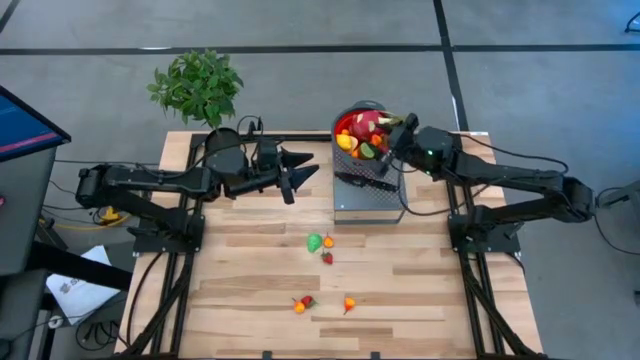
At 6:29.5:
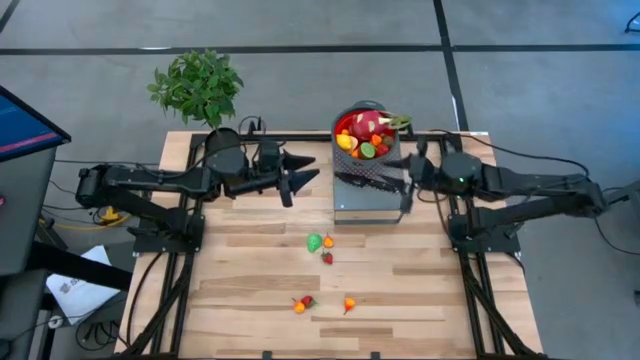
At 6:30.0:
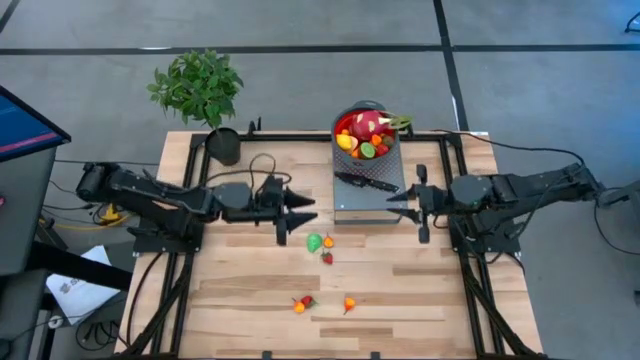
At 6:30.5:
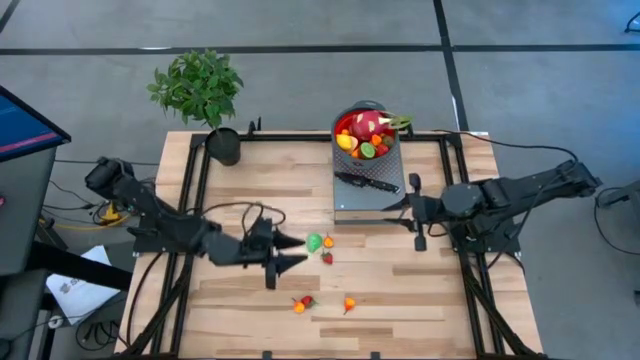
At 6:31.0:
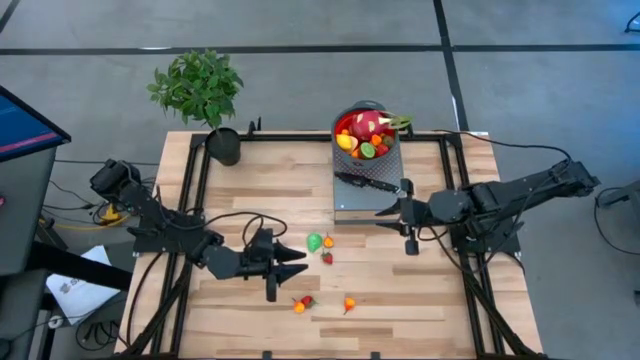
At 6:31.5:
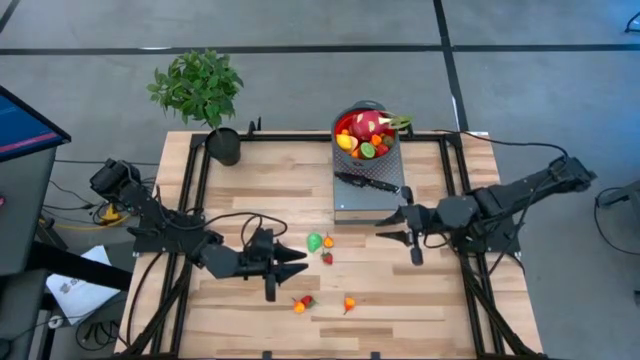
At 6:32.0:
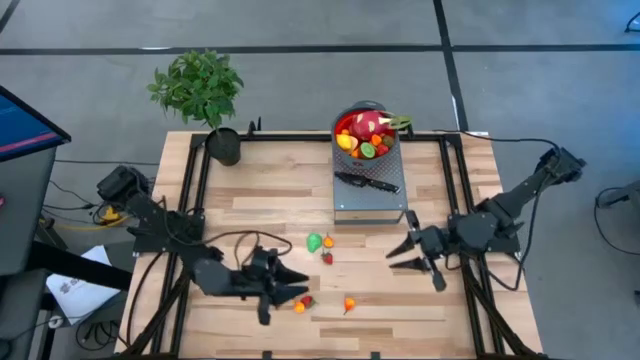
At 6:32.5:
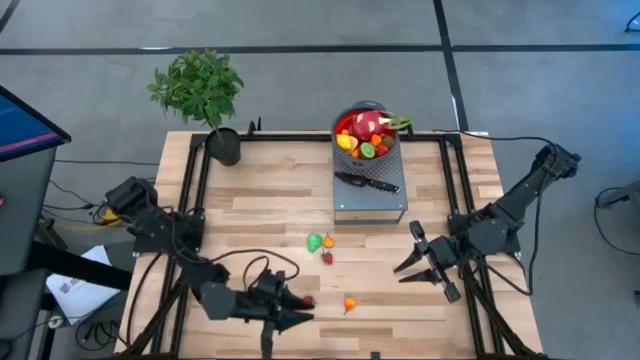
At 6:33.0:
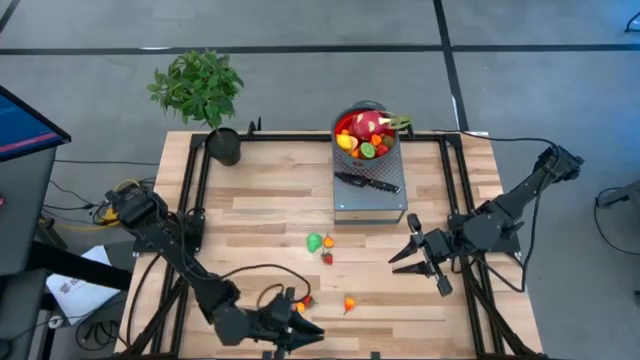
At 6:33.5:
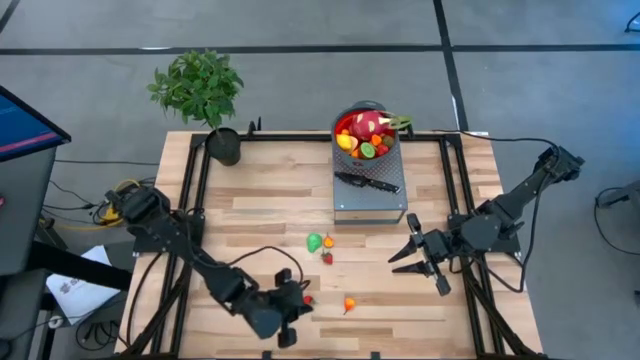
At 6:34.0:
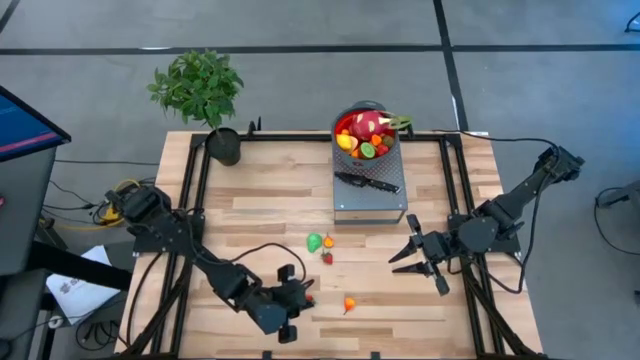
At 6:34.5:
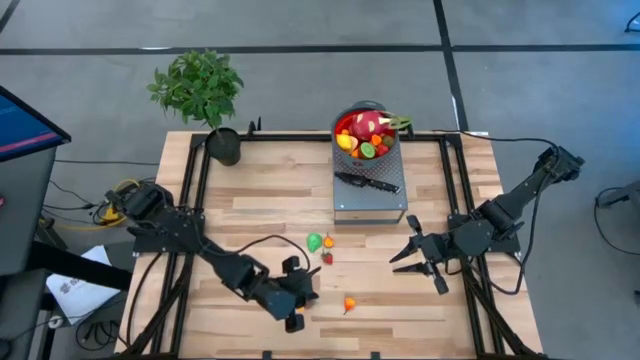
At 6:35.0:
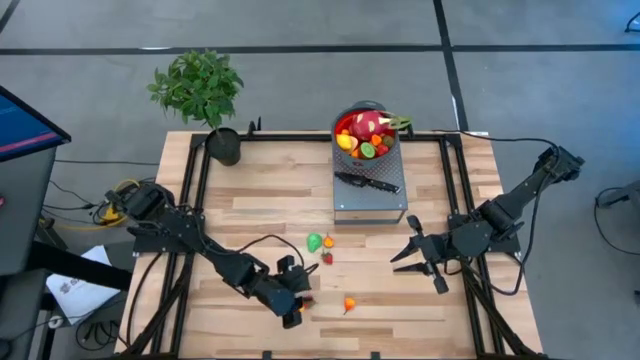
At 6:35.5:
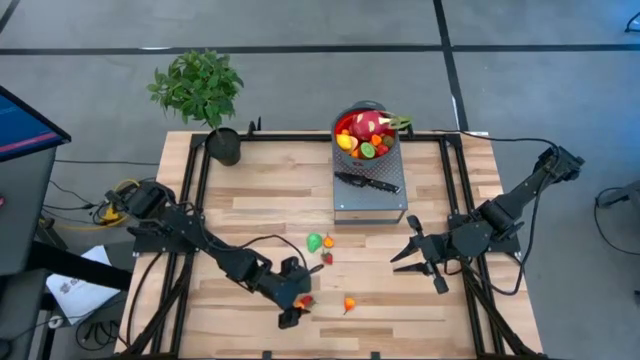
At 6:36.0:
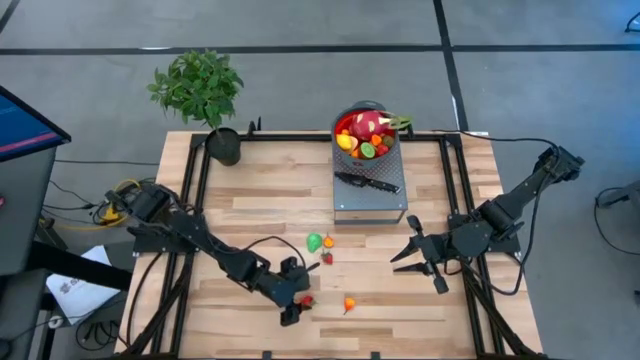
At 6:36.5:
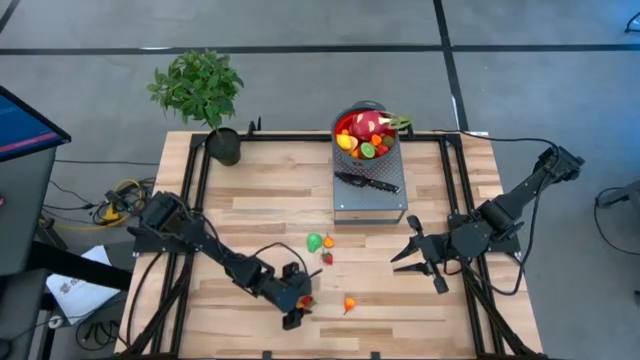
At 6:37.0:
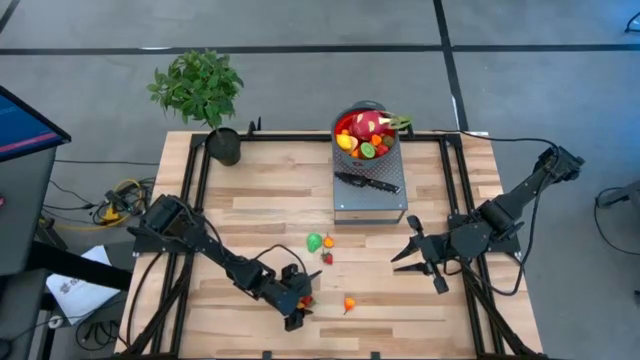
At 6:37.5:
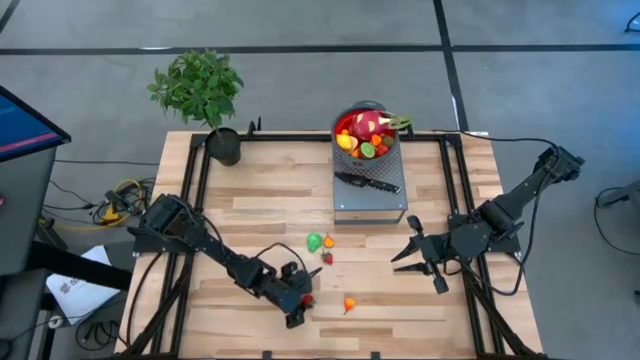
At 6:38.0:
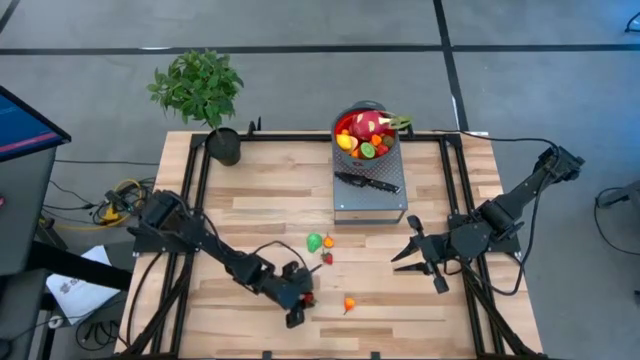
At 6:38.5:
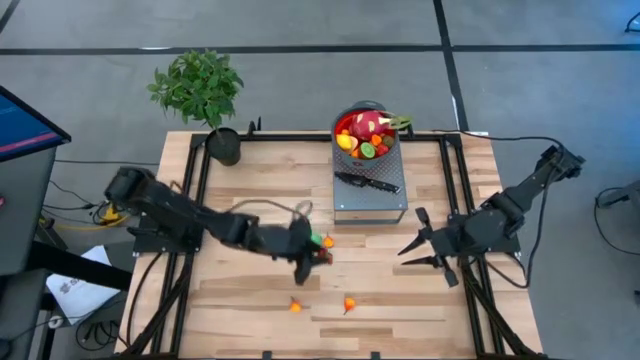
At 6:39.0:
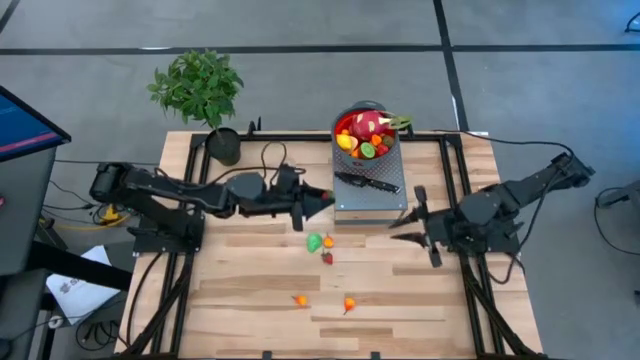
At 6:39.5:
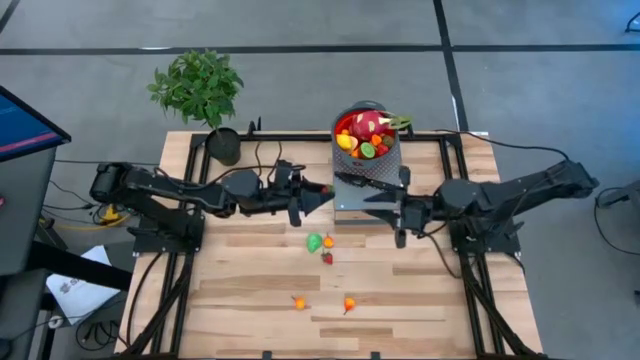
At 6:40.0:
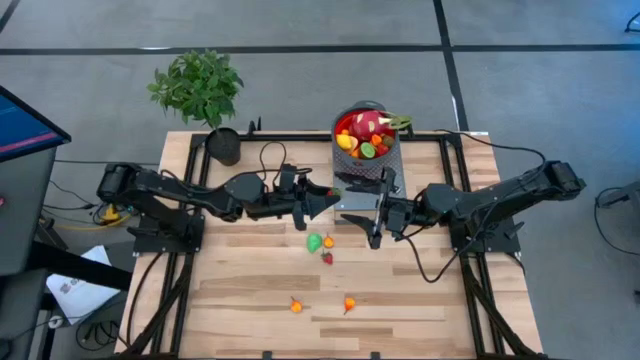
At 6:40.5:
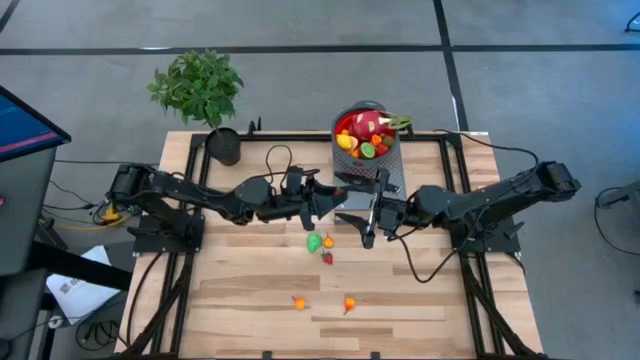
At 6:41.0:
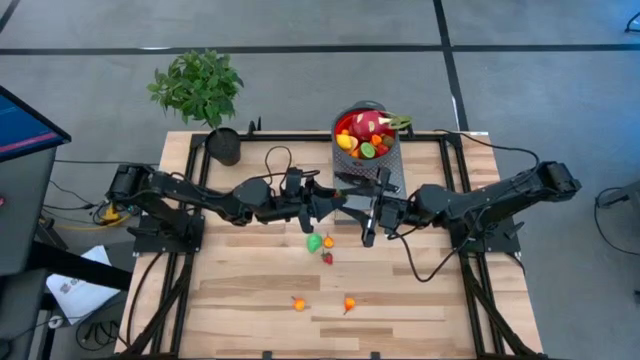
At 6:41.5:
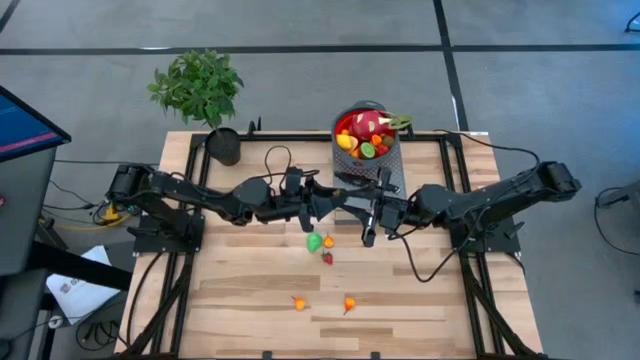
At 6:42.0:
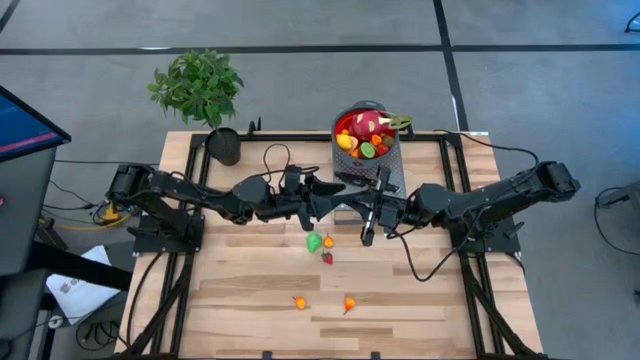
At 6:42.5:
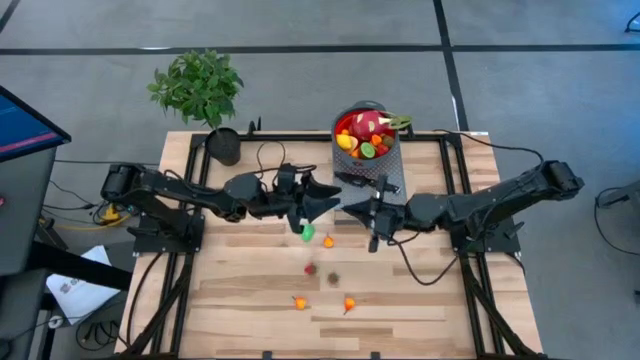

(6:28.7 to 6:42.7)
Task: Pick & Place Fruit
Put the strawberry into the red colander on the shelf

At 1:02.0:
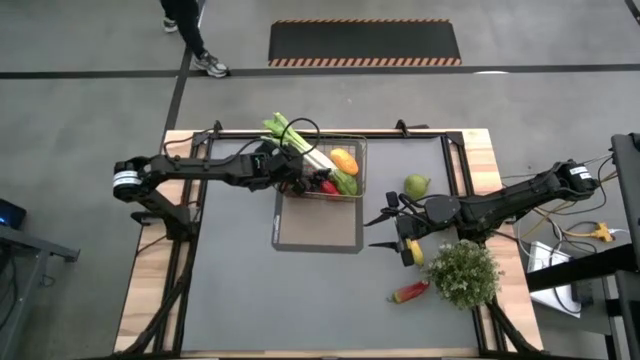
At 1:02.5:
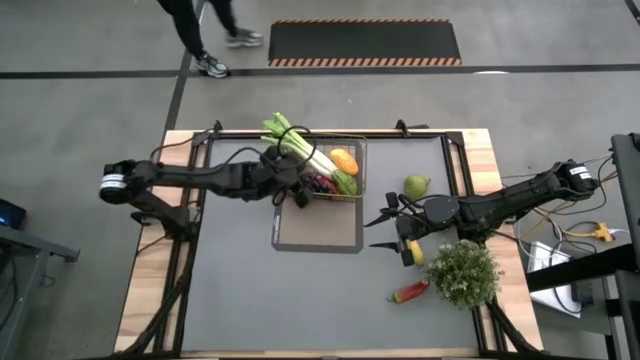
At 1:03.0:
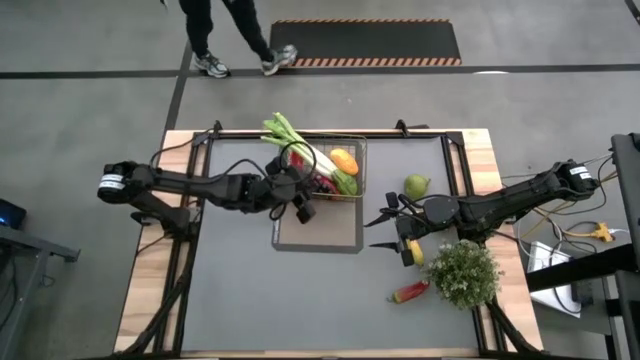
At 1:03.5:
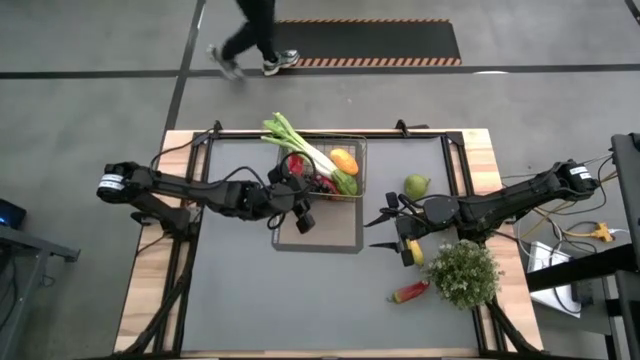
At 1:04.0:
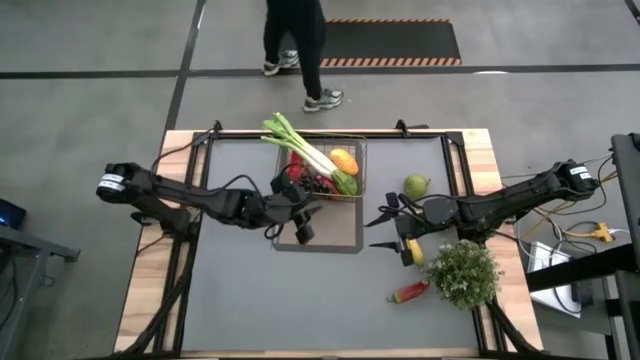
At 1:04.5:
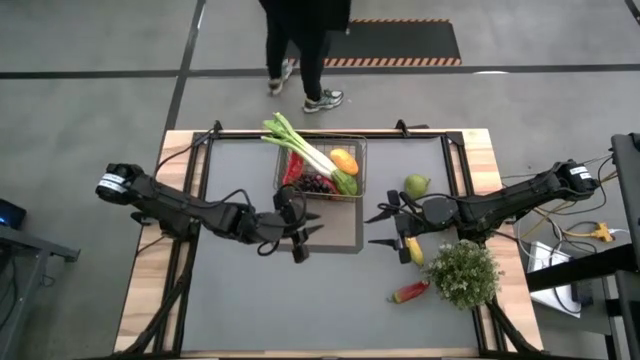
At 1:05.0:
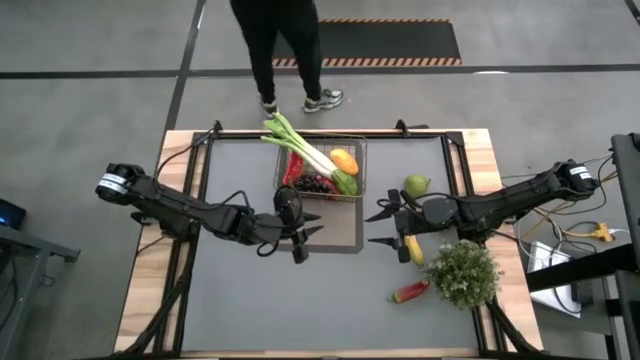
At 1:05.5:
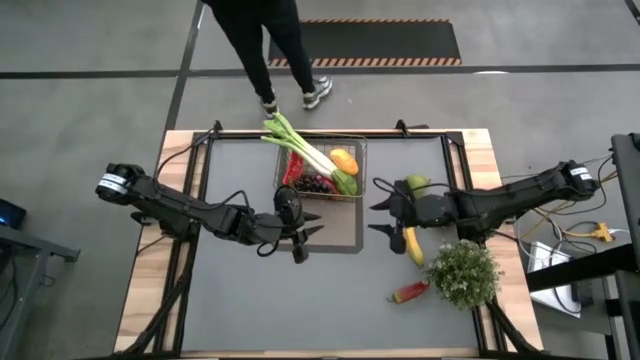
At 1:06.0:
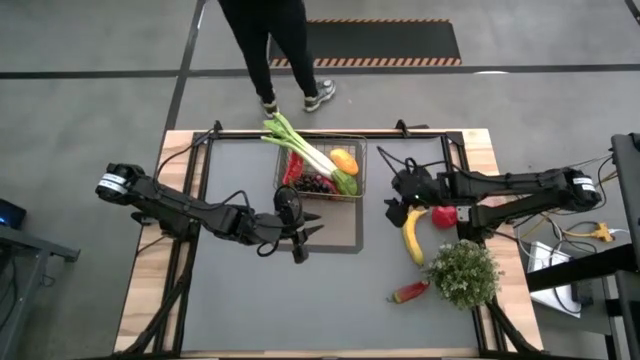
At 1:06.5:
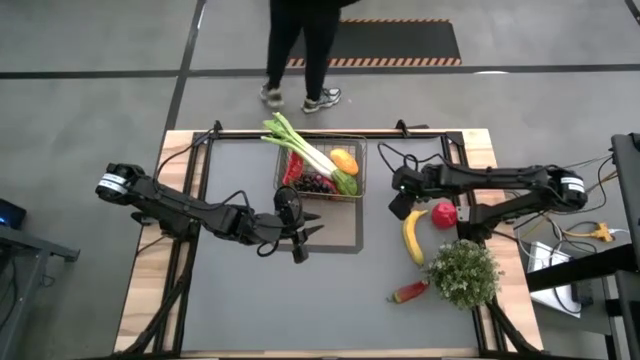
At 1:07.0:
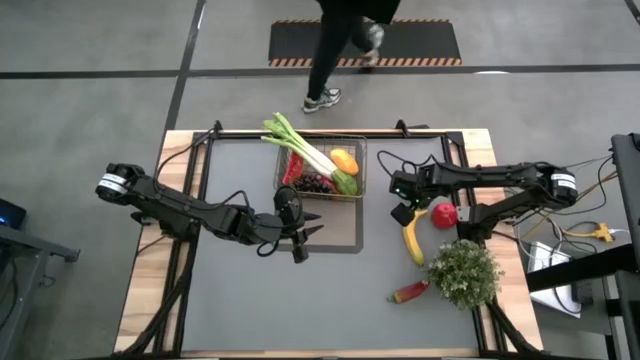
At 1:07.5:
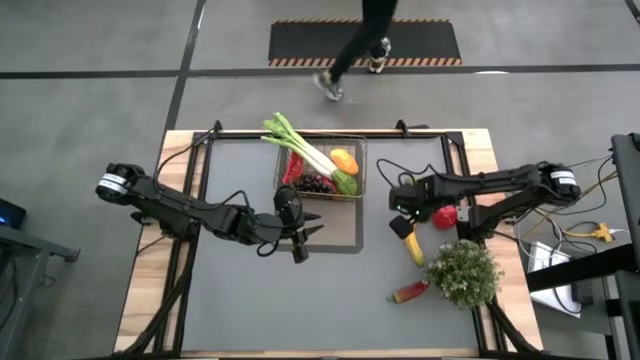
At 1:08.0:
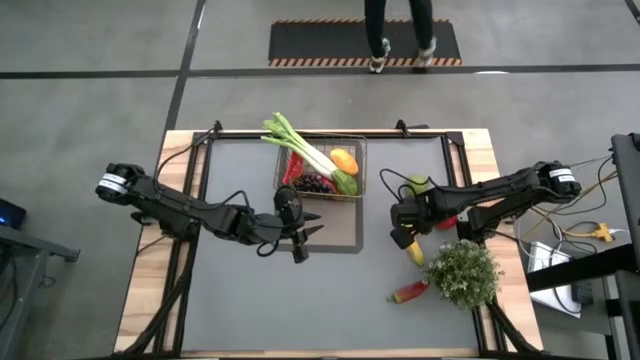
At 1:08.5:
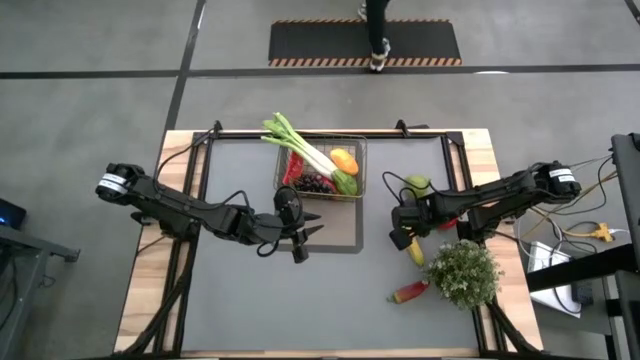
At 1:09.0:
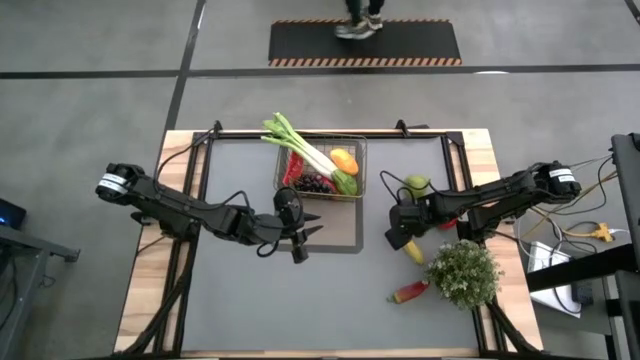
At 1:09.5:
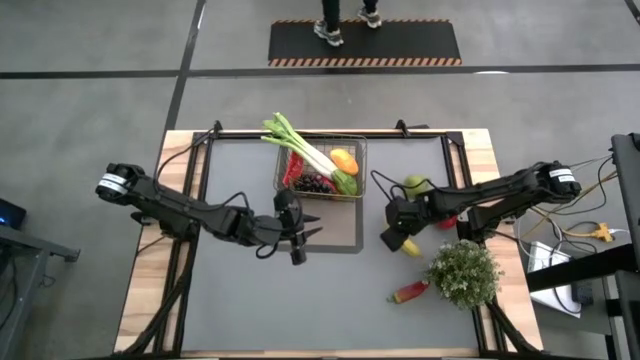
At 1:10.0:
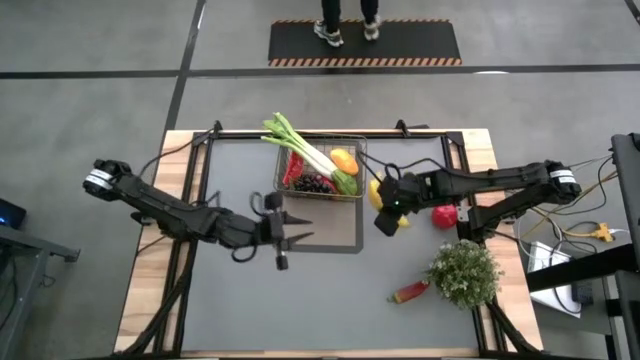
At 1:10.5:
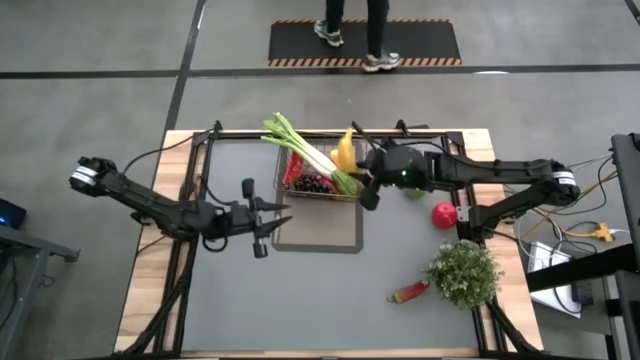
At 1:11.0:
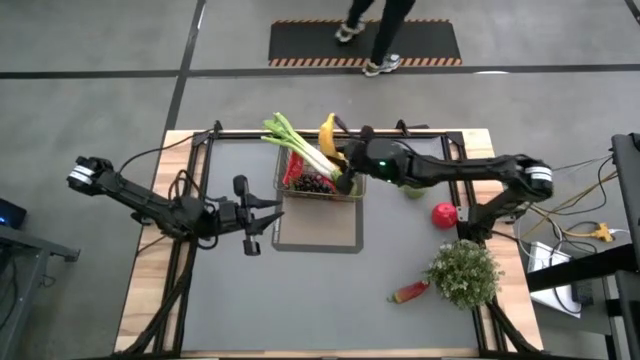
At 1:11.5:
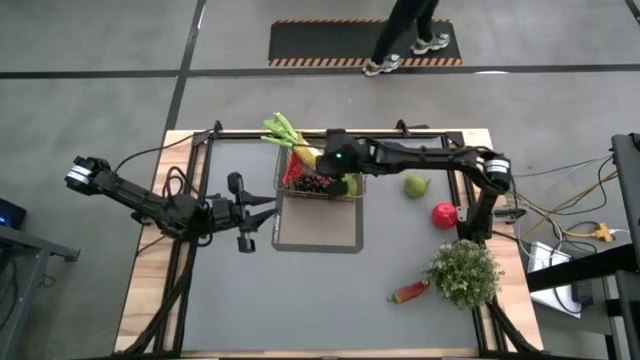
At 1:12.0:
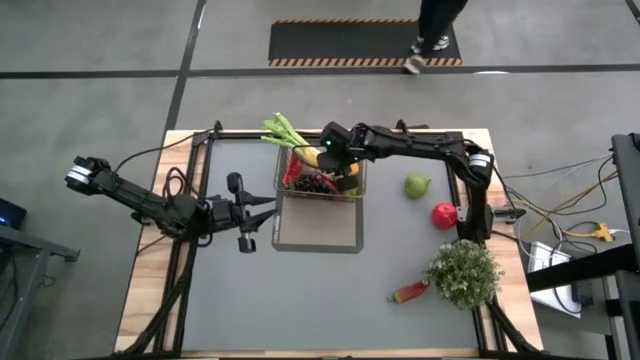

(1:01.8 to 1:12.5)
Task: Build produce basket
Put the banana into the wire basket
